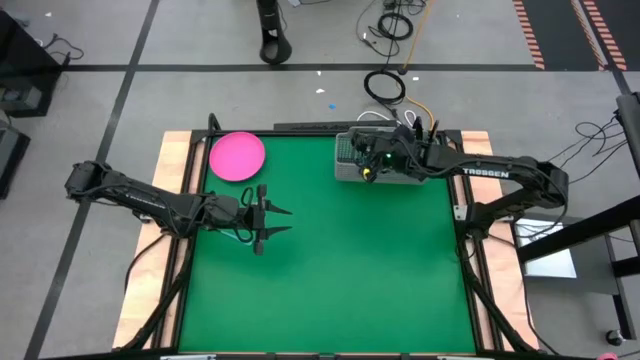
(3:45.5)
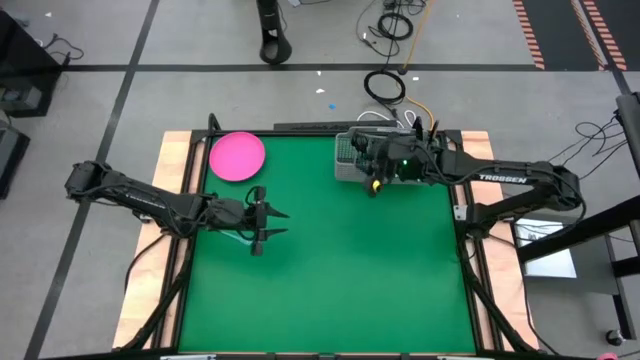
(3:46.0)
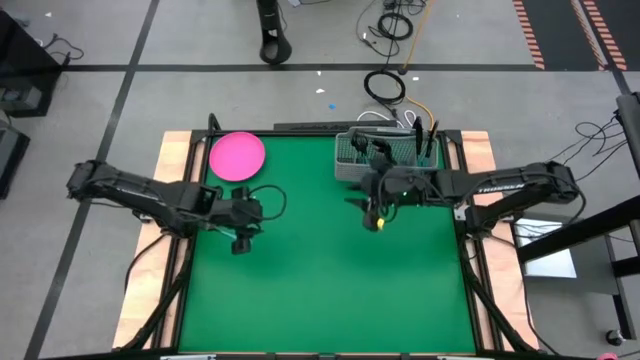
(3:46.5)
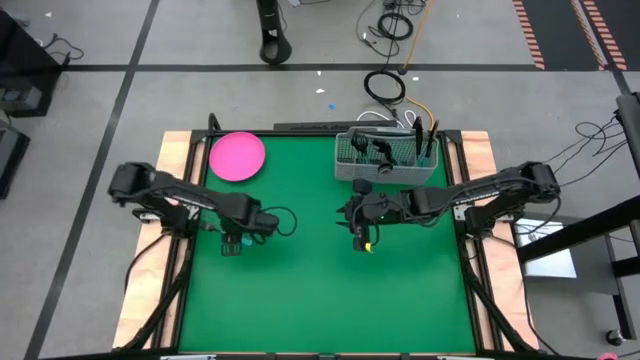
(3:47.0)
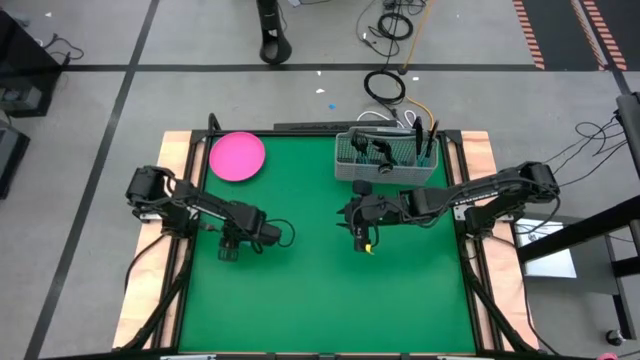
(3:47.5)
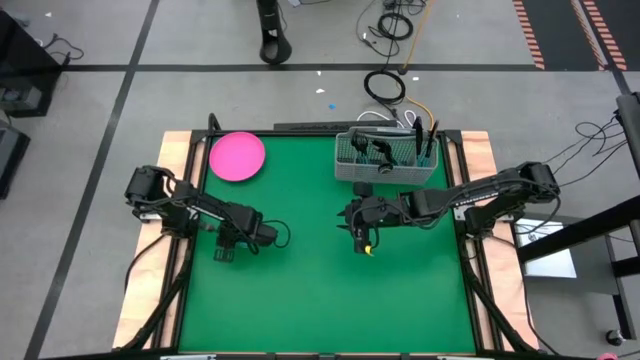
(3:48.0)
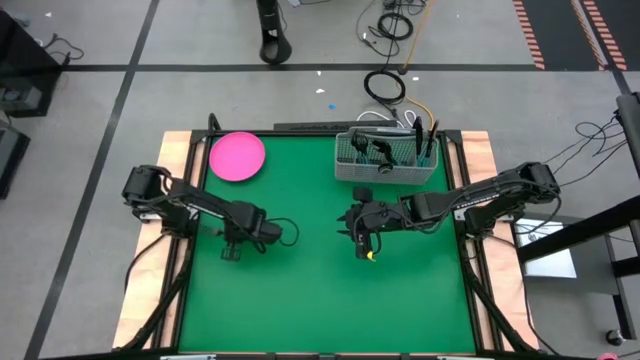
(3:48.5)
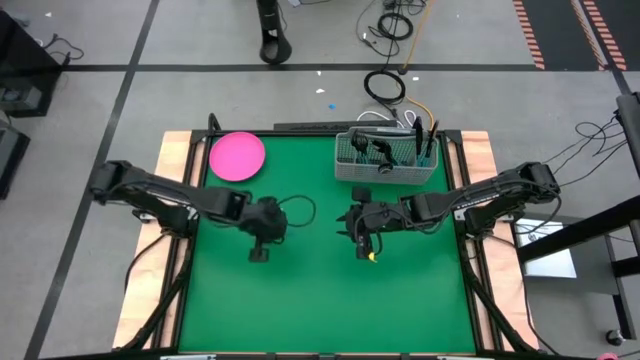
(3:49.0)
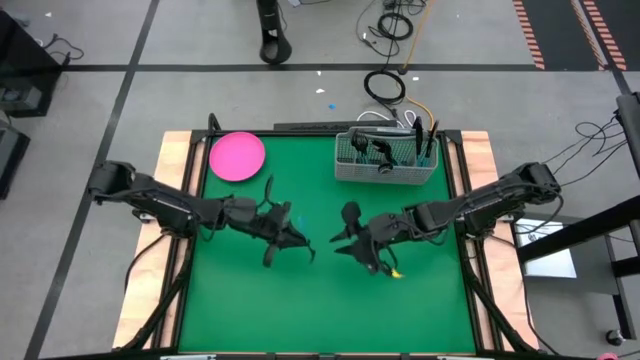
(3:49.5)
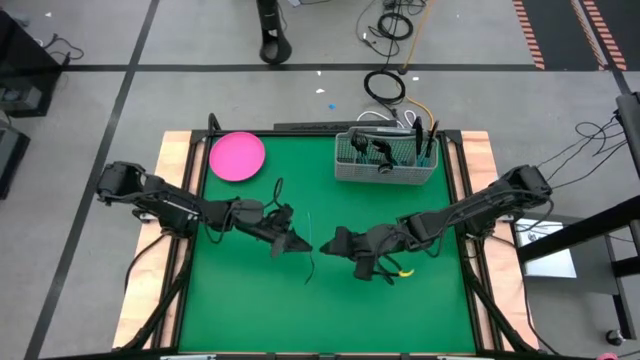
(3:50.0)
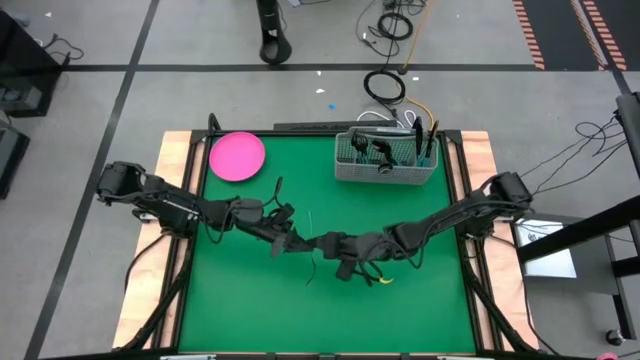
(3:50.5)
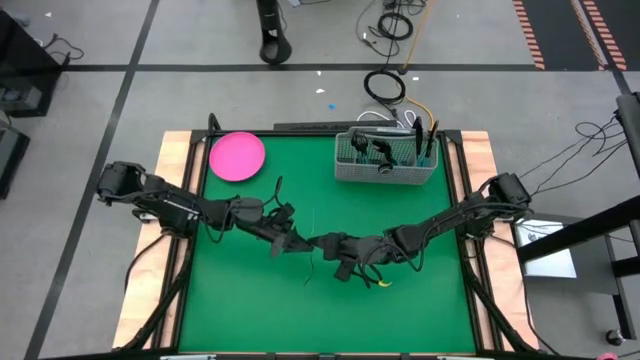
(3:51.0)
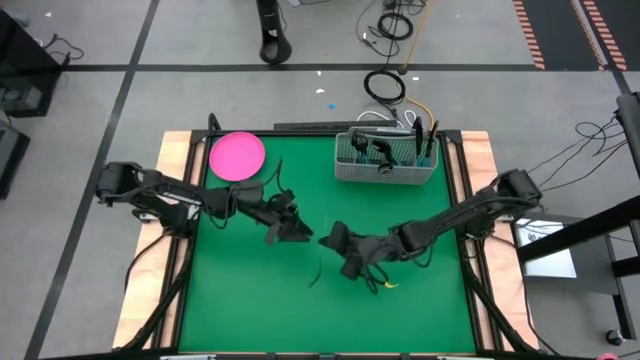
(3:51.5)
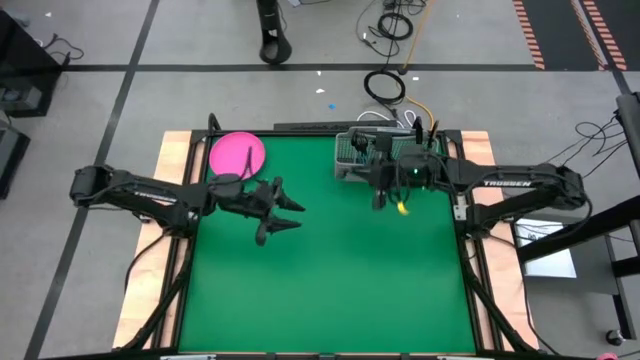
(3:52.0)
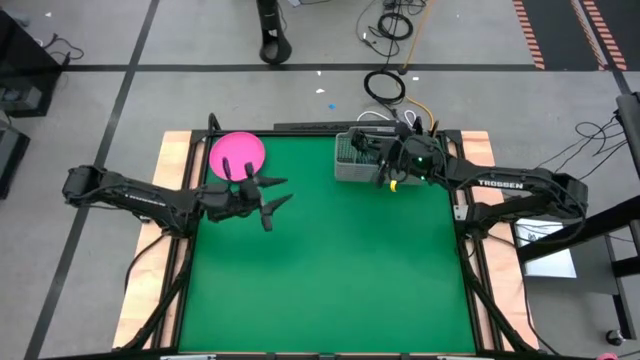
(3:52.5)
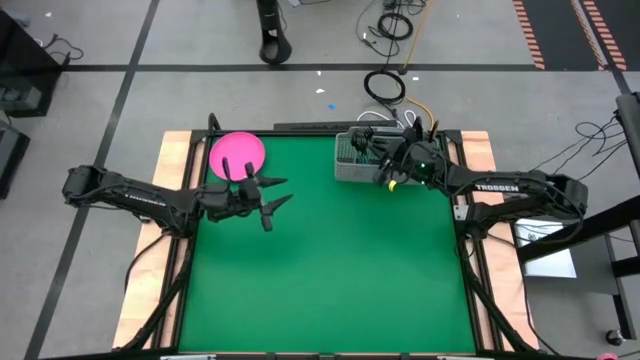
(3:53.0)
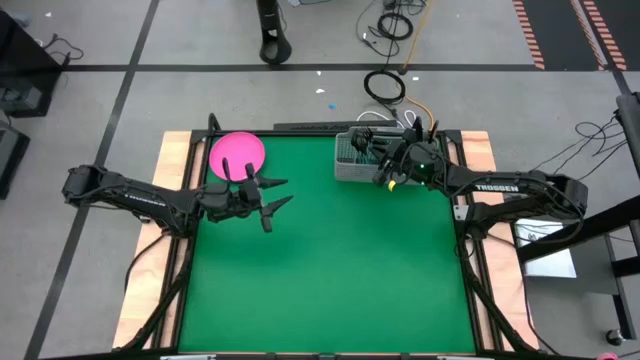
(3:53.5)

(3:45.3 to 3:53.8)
Task: Sort silverware
Put the black fork into the cutlery rack with the other black forks

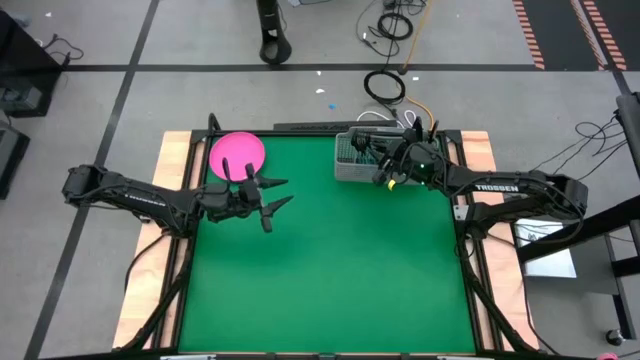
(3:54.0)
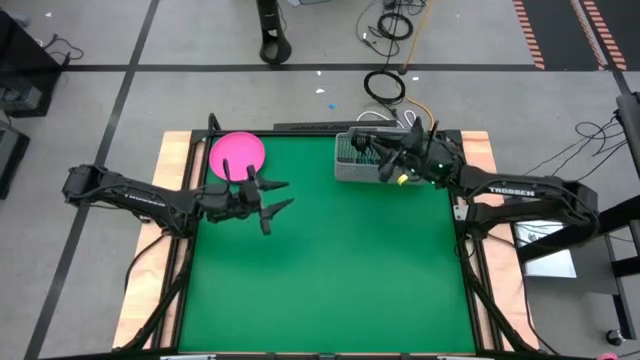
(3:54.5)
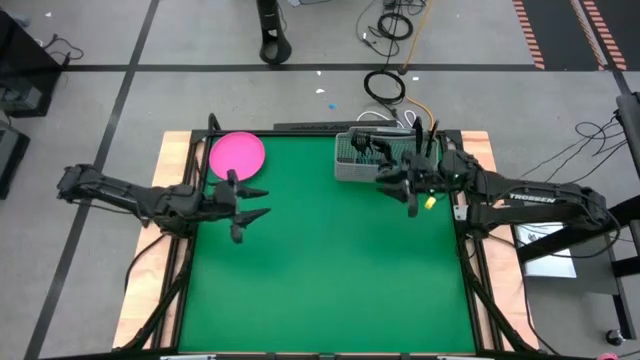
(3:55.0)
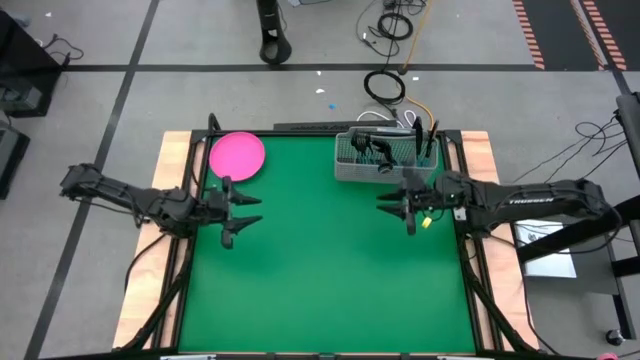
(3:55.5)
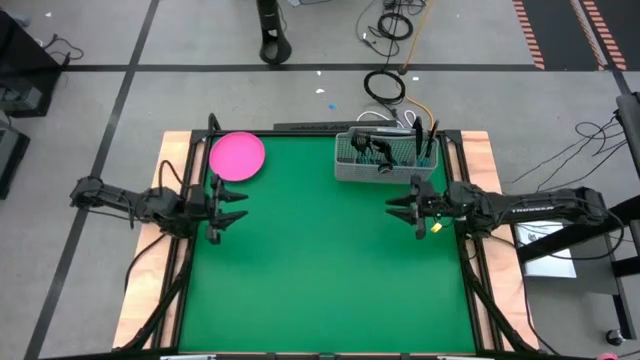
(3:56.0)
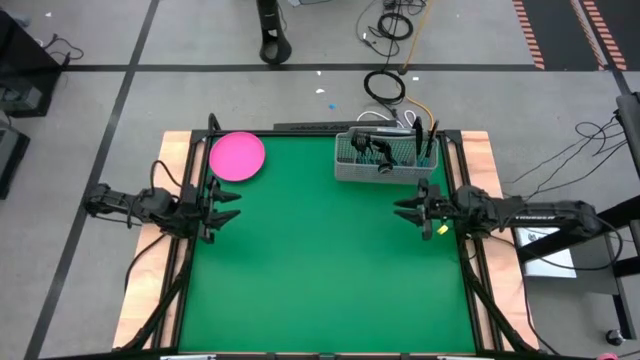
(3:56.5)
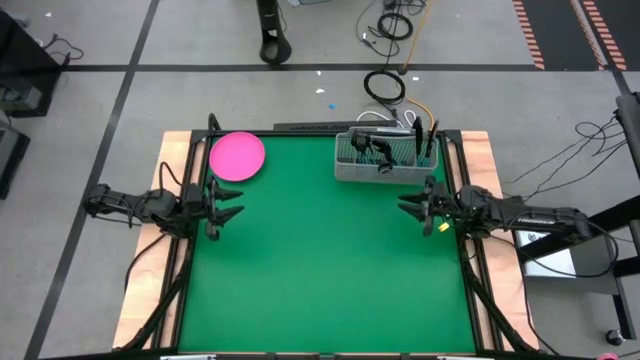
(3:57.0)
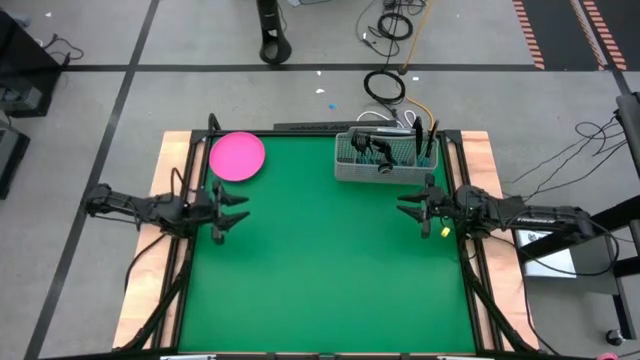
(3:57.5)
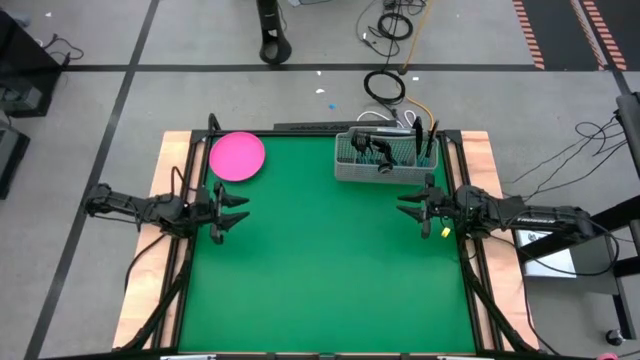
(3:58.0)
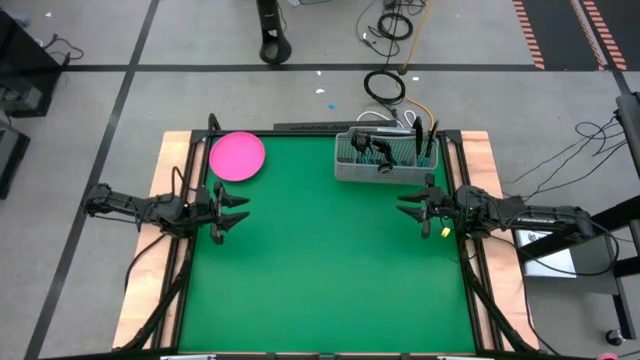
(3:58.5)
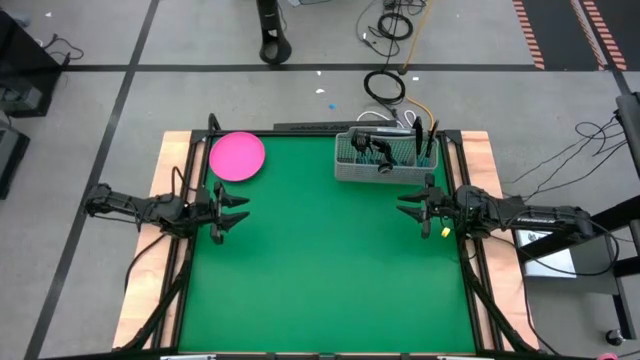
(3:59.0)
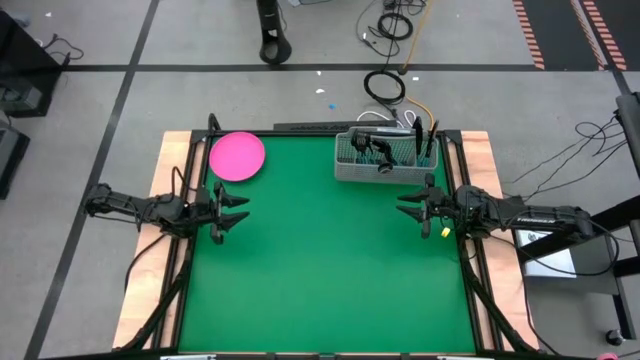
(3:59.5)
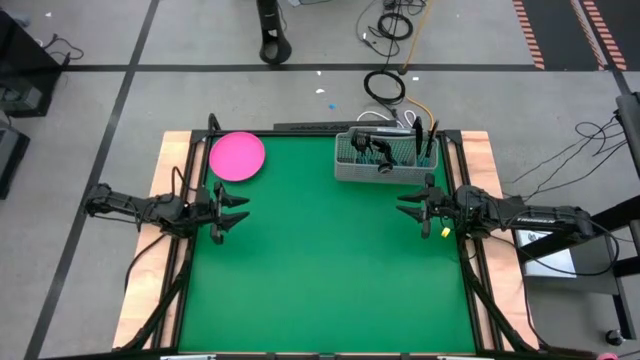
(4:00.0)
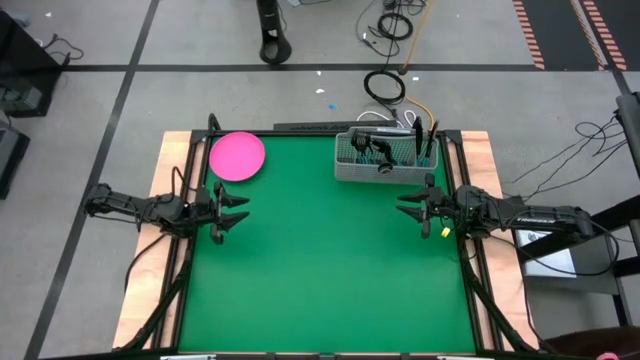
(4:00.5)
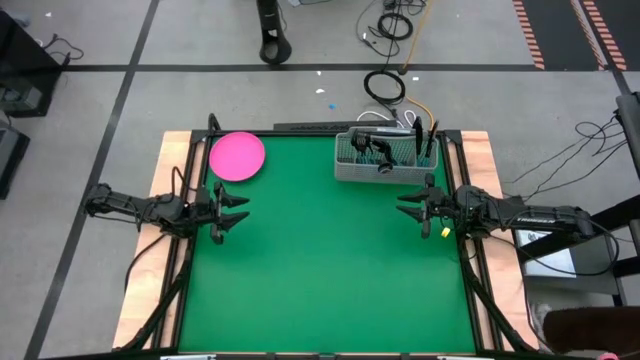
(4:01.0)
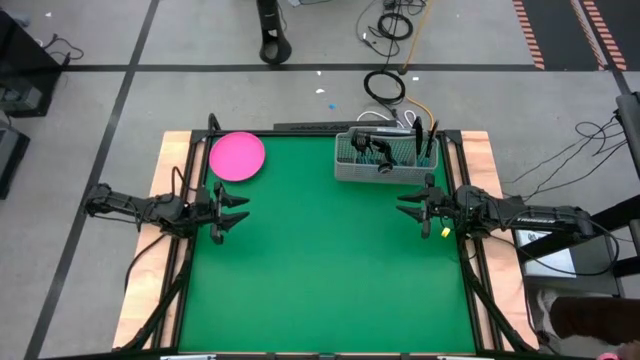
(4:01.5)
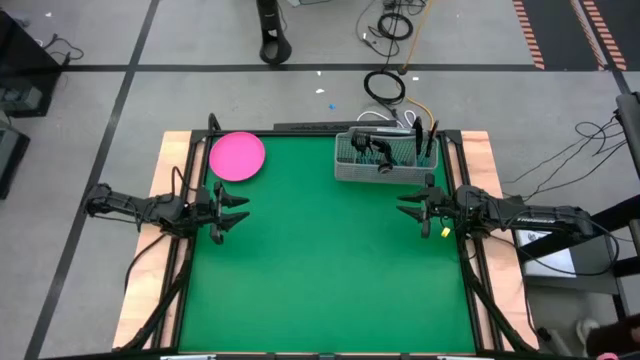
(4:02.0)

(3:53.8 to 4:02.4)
Return to Home Position

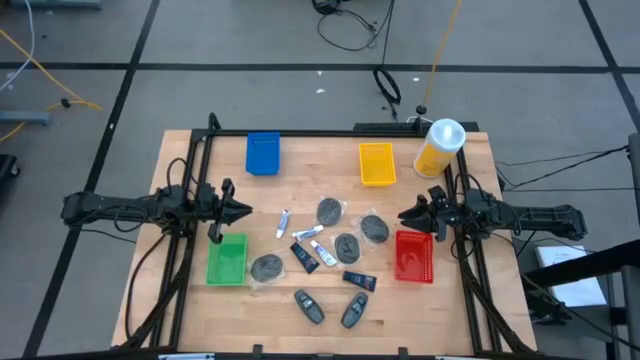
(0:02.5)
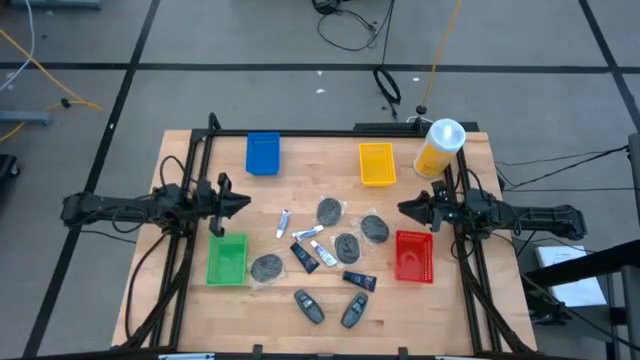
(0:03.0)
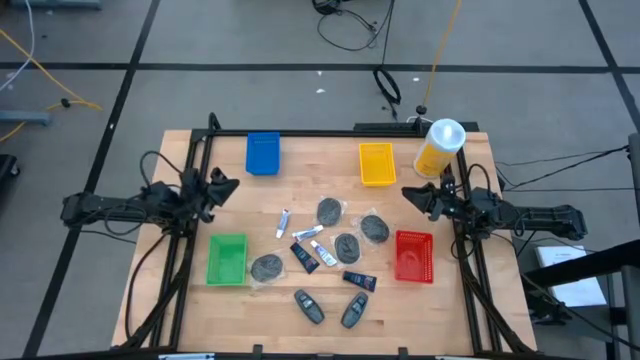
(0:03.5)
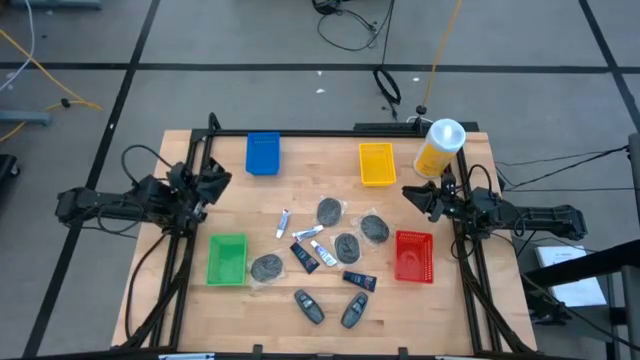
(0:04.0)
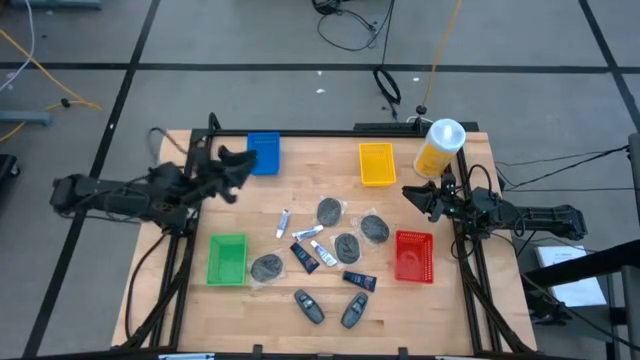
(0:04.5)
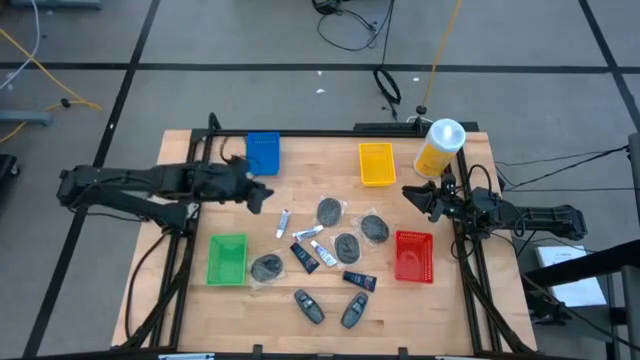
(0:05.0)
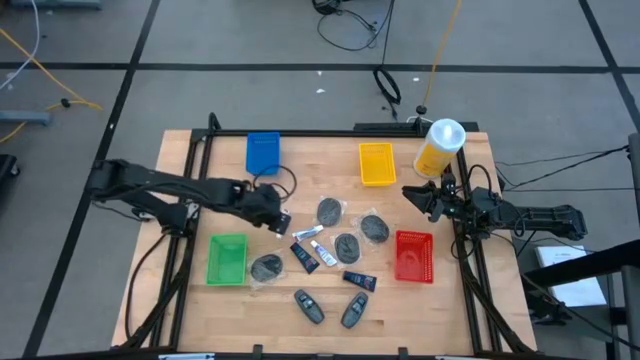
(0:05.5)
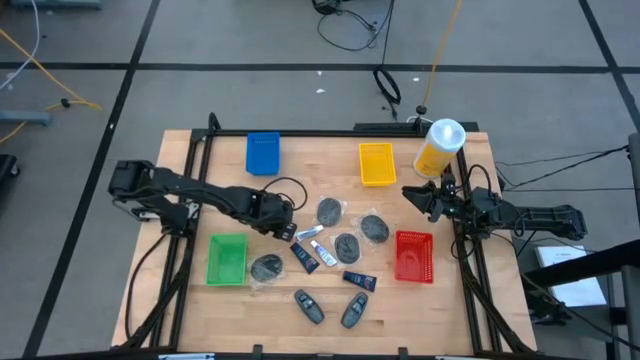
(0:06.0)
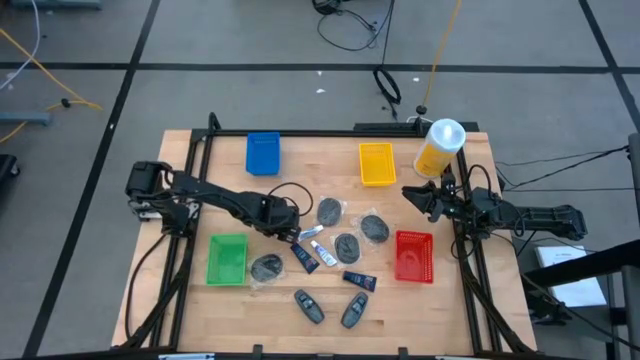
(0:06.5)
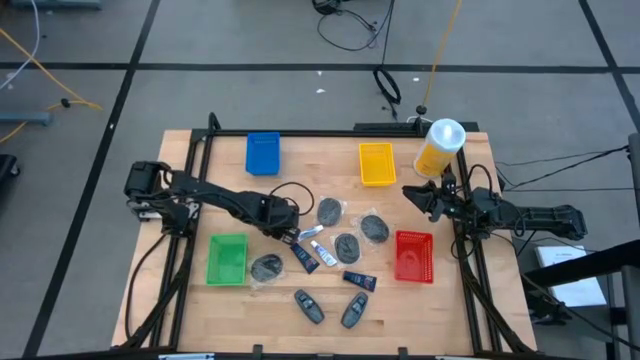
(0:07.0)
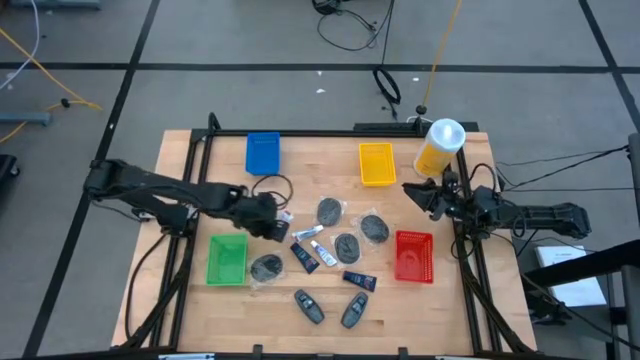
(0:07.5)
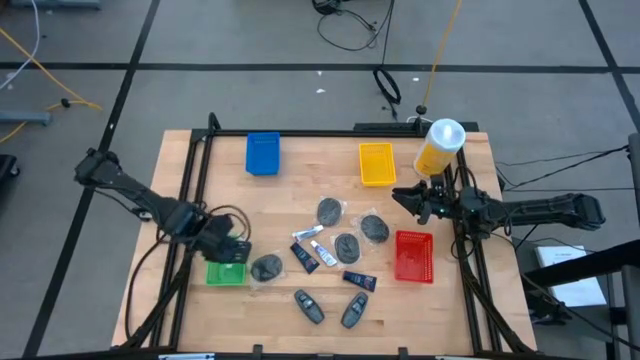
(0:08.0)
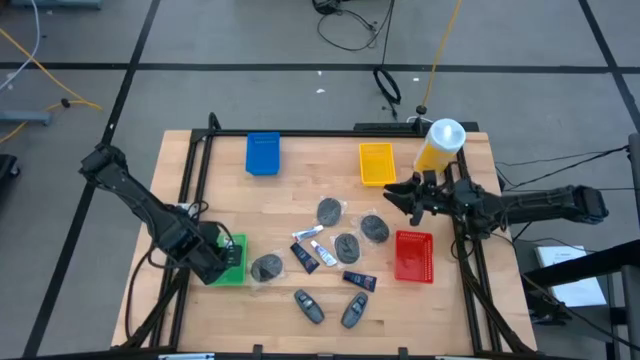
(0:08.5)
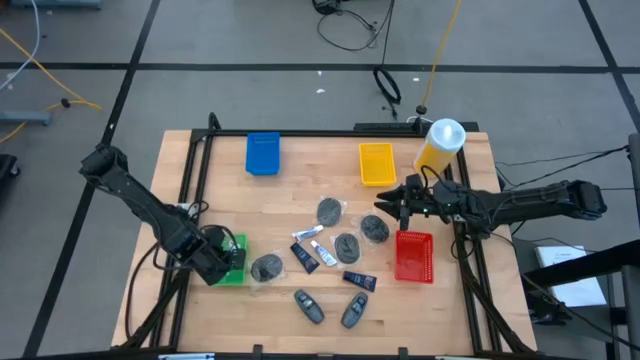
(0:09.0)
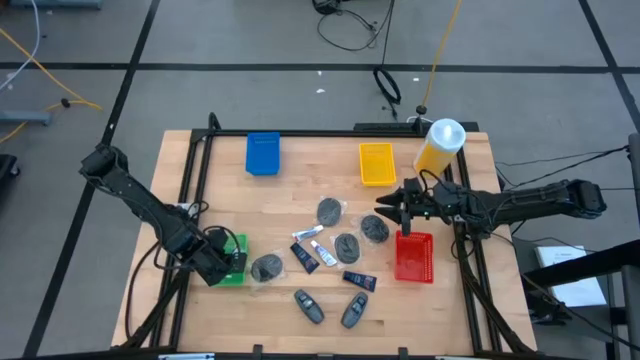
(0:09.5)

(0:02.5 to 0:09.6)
Task: Pick & Place Travel size toiletries
Put the white toothpaste into the green bin
